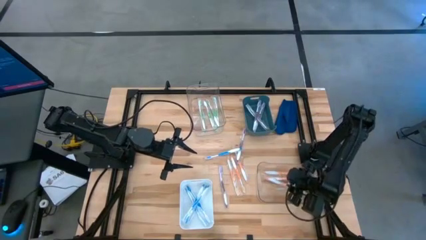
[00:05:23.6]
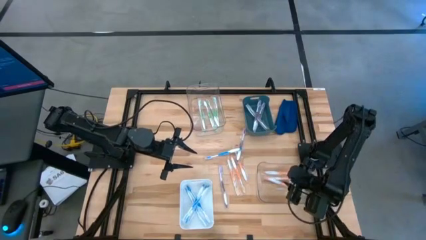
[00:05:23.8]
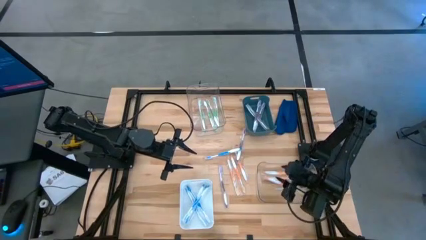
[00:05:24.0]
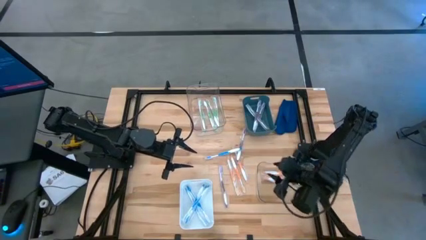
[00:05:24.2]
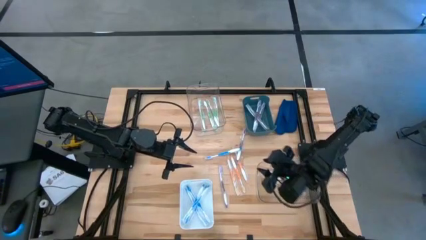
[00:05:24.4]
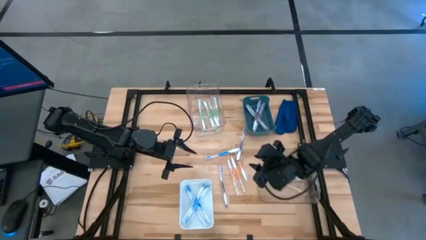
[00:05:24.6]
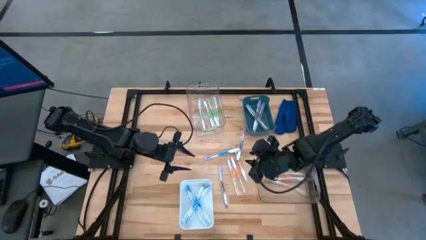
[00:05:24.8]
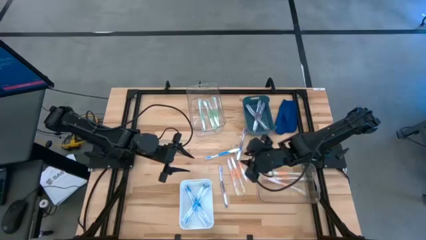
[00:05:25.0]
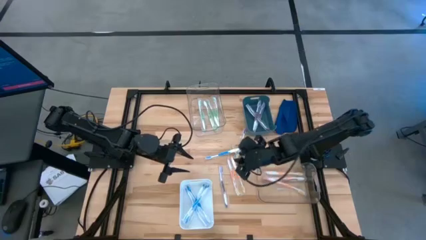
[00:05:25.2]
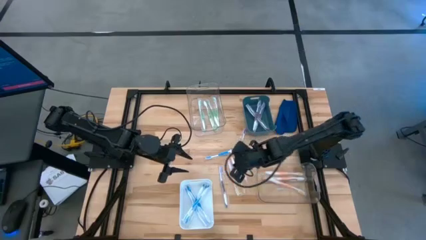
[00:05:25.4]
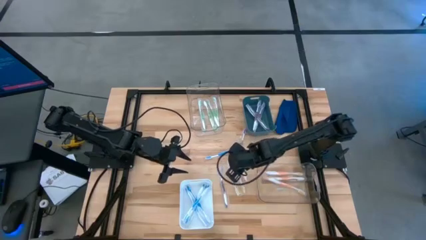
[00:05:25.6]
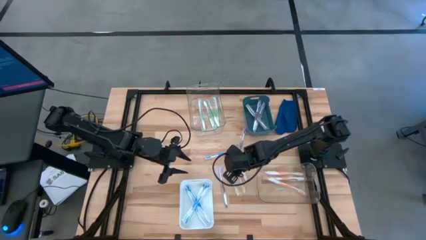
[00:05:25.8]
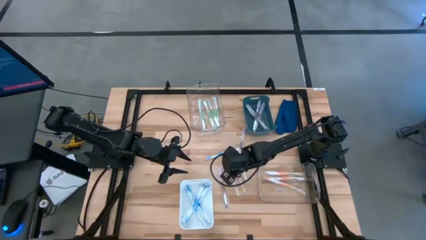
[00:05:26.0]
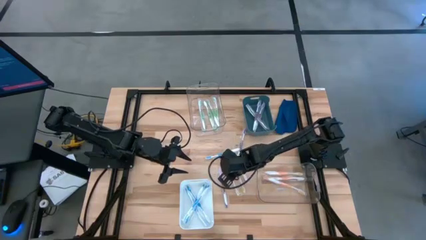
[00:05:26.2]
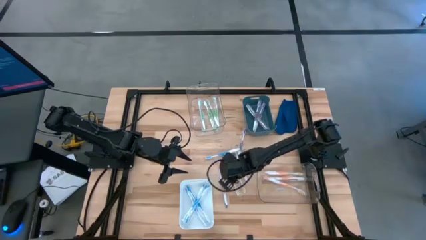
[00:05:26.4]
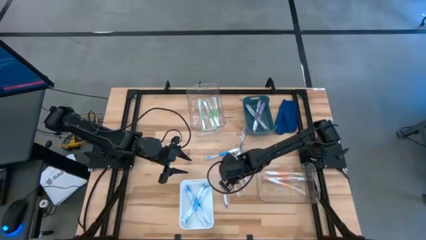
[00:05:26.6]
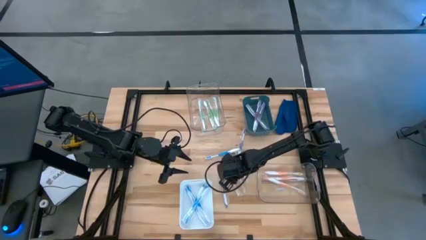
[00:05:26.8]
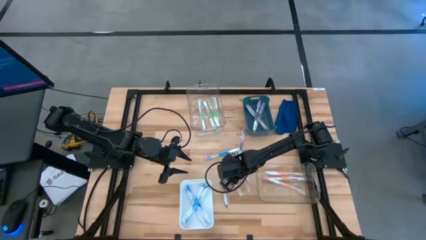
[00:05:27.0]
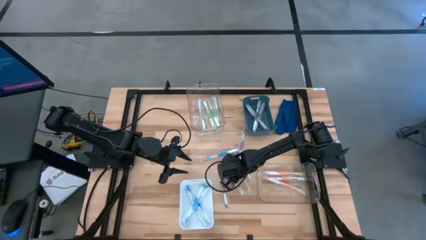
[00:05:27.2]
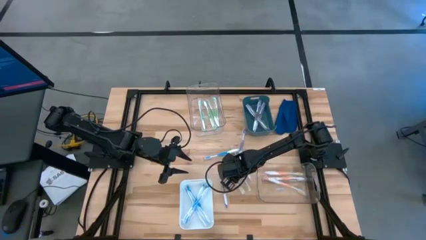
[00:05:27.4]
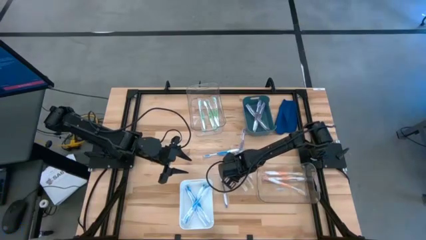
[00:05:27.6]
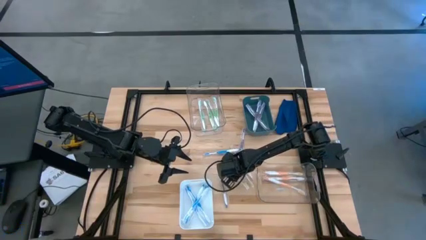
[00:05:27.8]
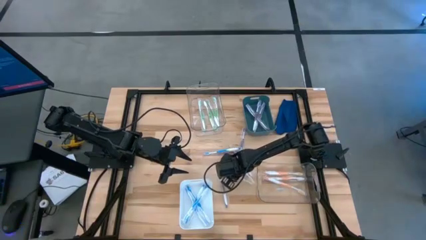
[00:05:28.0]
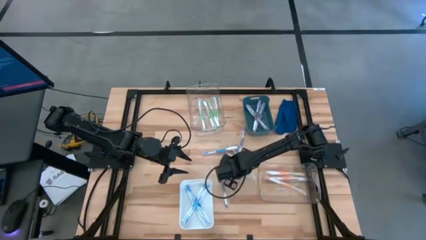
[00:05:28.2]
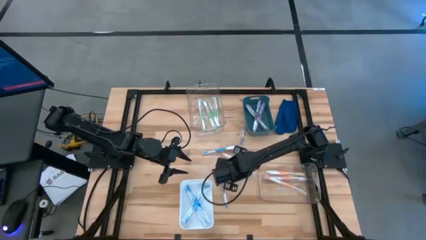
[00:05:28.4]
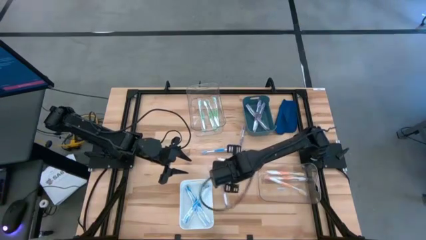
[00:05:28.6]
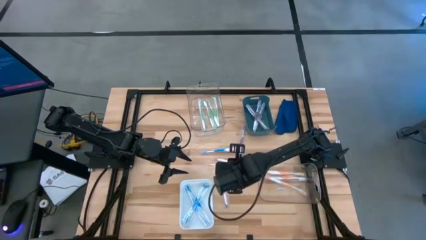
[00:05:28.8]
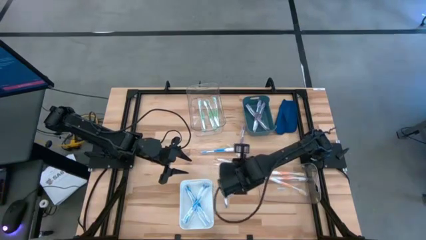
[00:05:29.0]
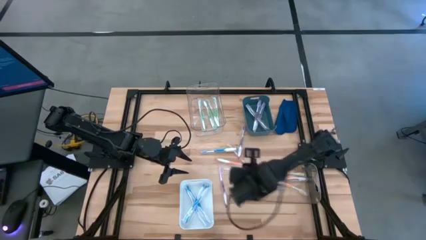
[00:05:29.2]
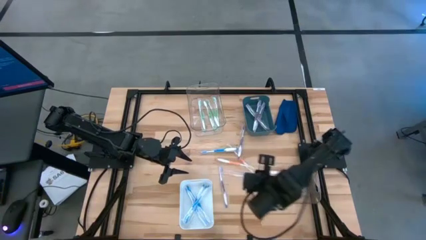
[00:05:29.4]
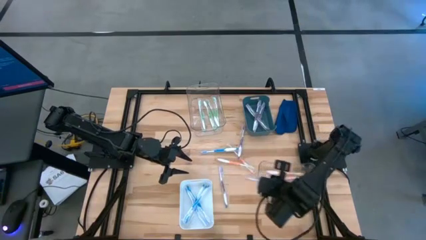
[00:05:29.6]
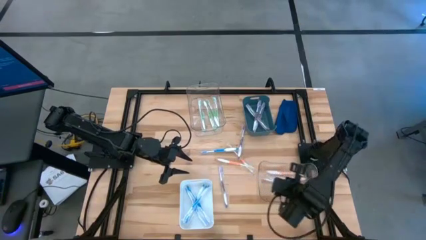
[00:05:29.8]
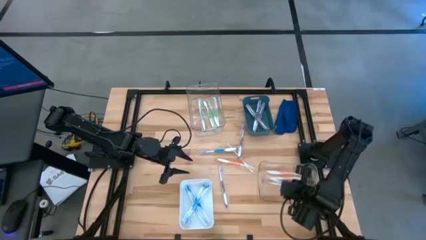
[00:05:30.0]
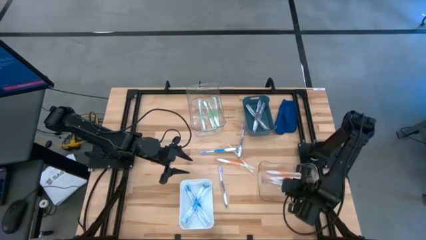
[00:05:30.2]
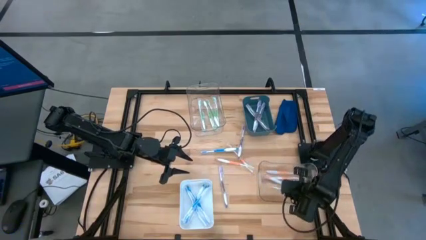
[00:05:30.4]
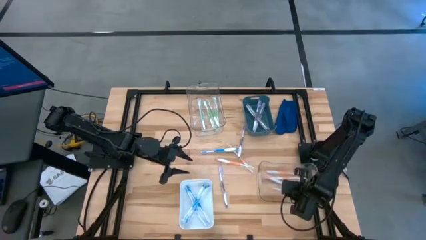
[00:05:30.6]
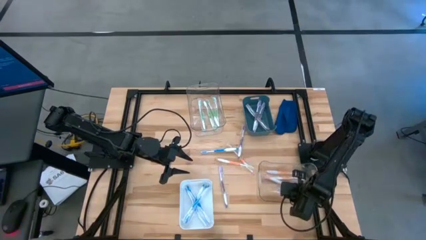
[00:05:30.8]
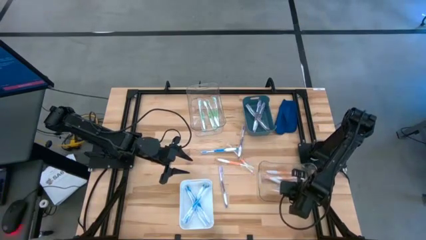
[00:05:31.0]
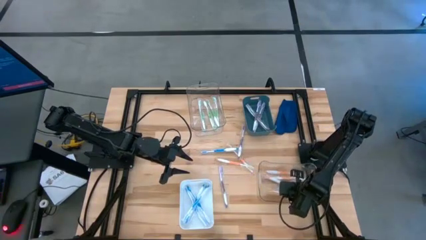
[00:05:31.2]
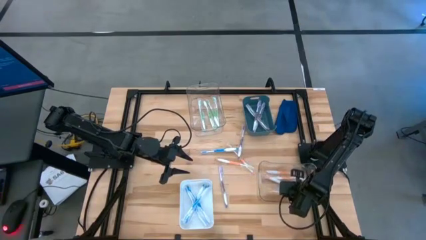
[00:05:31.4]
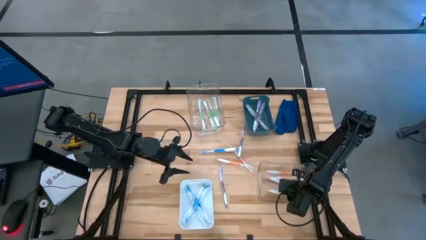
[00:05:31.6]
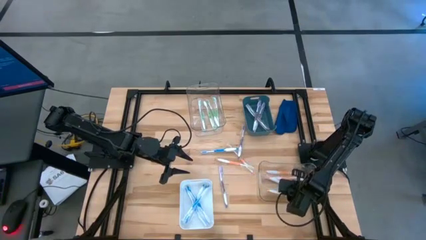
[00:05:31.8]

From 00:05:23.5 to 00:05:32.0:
Task: Pick & Place Toothbrushes
Put the orange toothbrush into the bottom transparent bin

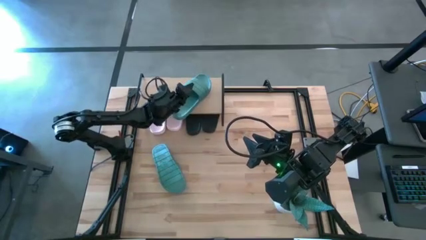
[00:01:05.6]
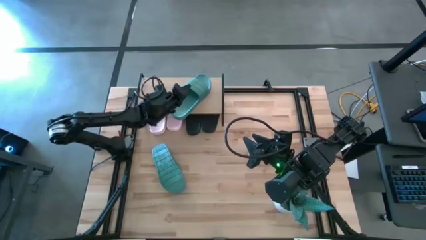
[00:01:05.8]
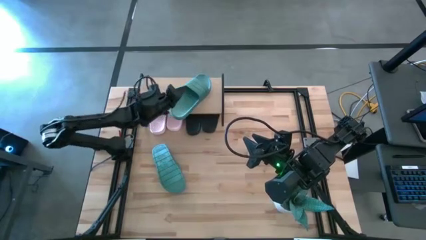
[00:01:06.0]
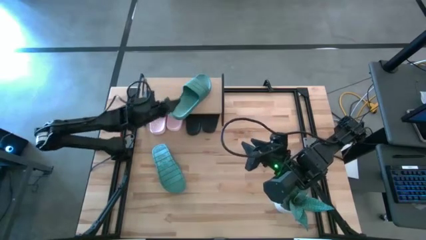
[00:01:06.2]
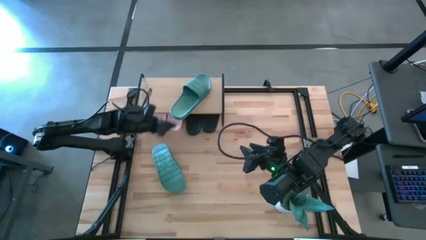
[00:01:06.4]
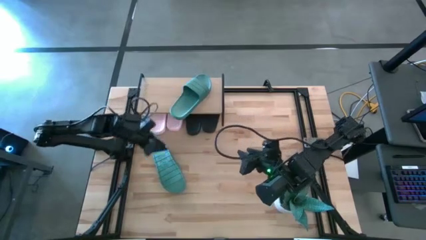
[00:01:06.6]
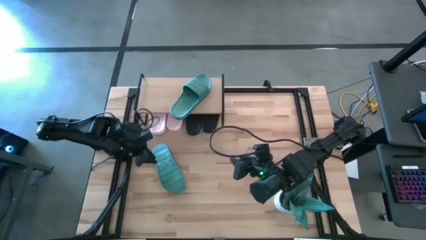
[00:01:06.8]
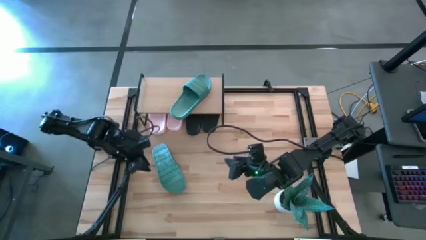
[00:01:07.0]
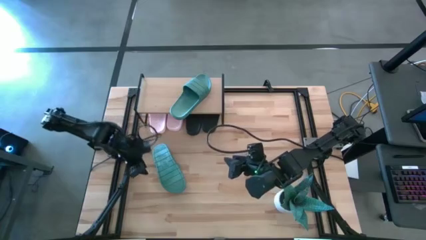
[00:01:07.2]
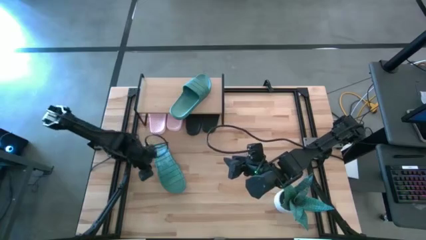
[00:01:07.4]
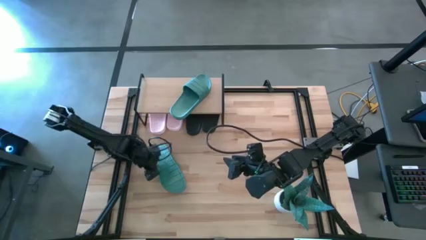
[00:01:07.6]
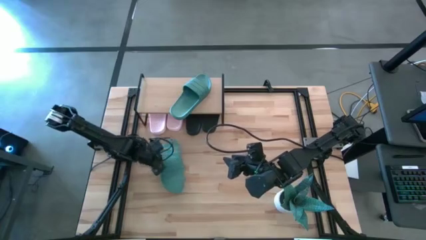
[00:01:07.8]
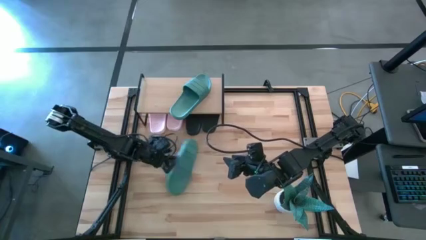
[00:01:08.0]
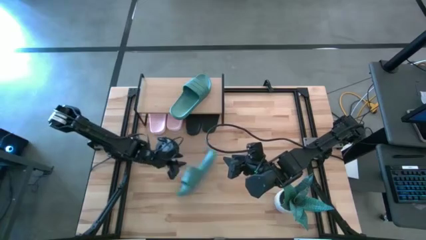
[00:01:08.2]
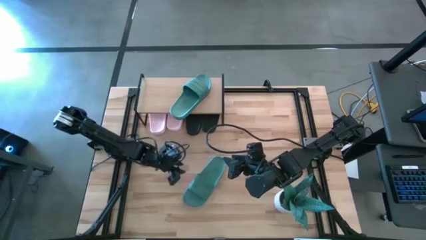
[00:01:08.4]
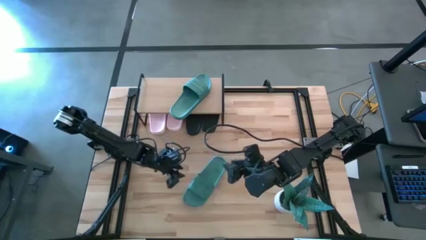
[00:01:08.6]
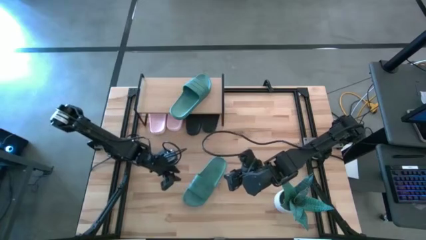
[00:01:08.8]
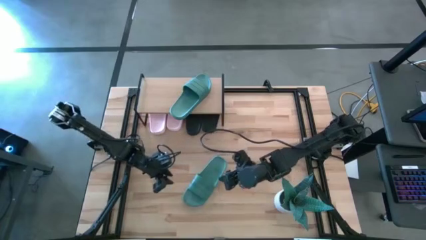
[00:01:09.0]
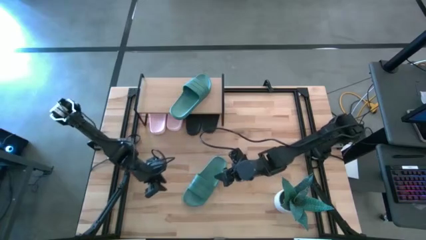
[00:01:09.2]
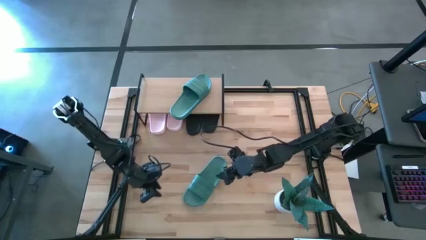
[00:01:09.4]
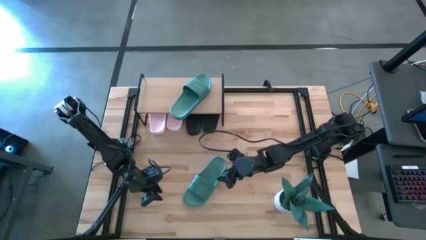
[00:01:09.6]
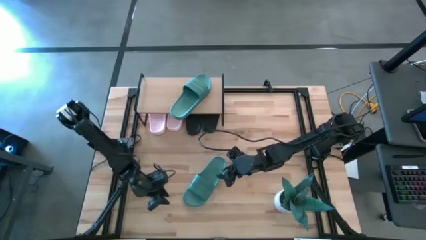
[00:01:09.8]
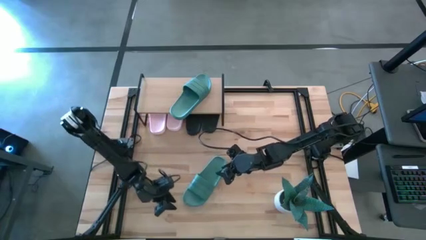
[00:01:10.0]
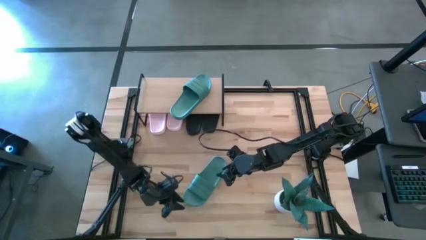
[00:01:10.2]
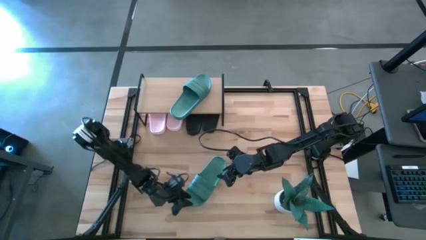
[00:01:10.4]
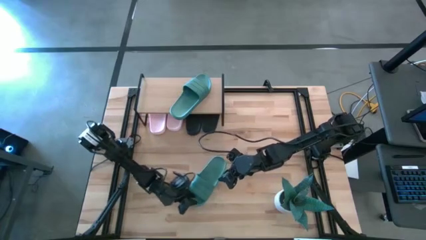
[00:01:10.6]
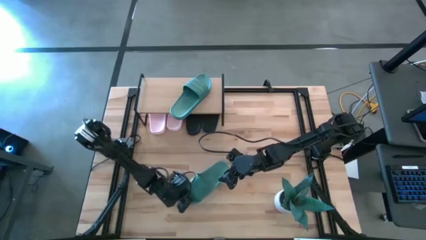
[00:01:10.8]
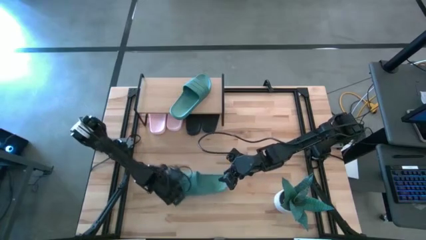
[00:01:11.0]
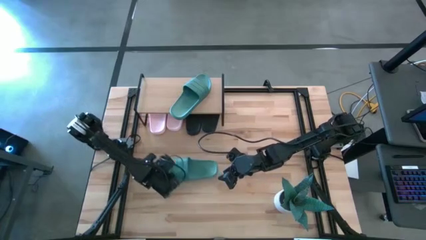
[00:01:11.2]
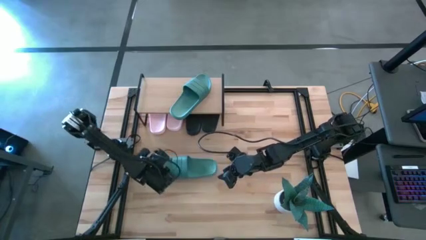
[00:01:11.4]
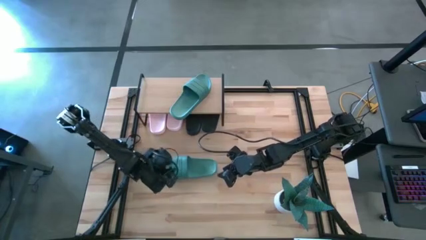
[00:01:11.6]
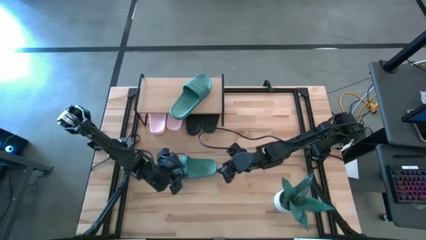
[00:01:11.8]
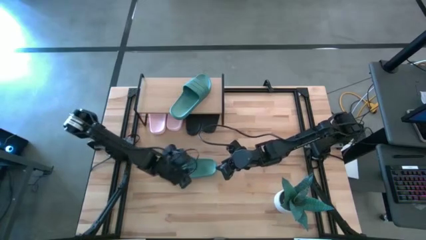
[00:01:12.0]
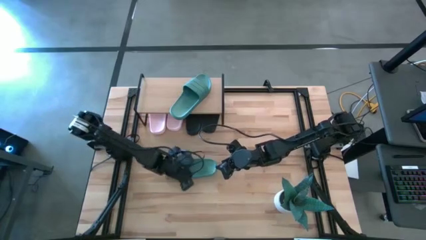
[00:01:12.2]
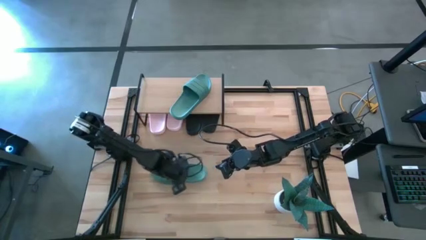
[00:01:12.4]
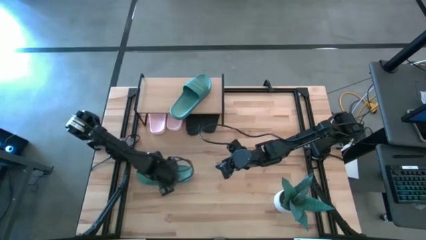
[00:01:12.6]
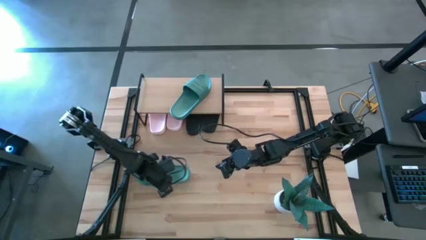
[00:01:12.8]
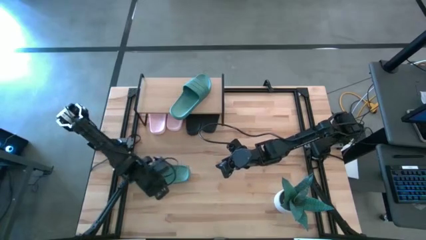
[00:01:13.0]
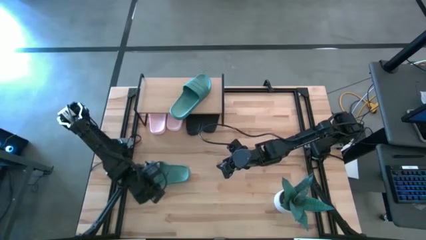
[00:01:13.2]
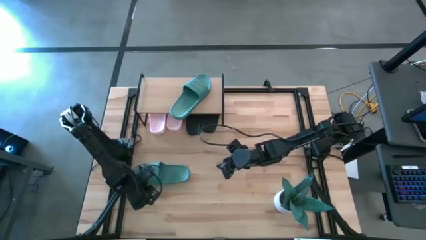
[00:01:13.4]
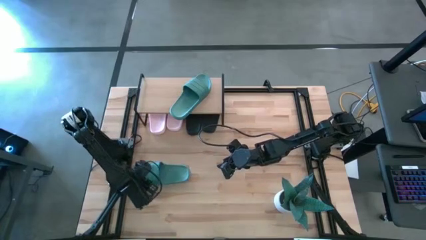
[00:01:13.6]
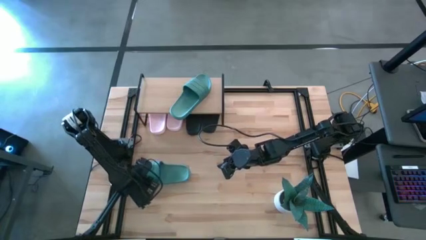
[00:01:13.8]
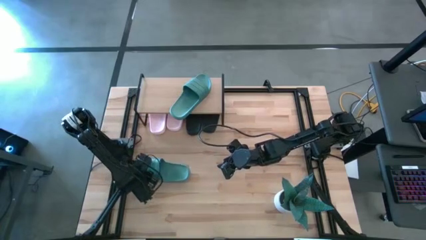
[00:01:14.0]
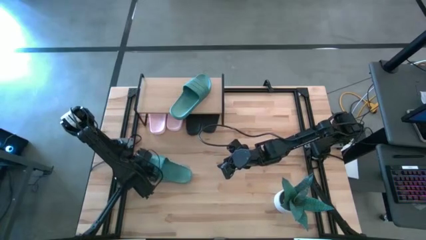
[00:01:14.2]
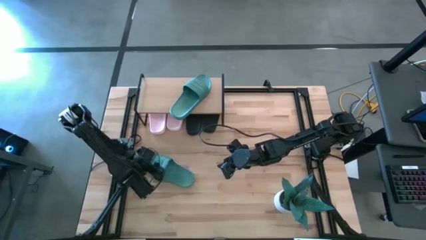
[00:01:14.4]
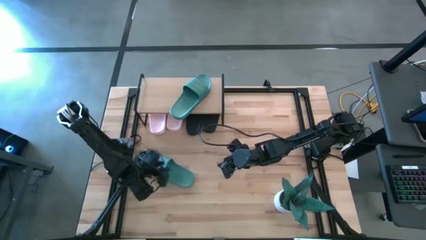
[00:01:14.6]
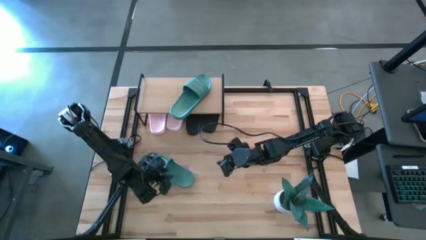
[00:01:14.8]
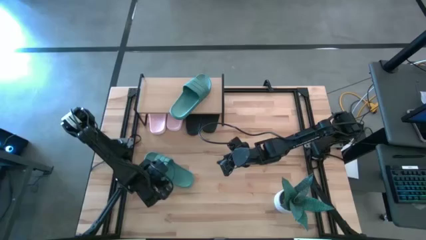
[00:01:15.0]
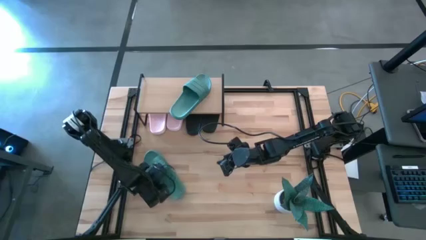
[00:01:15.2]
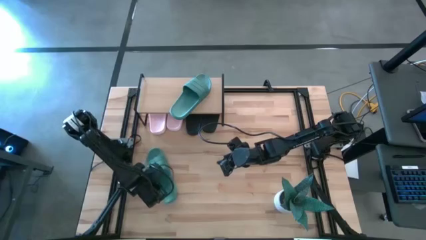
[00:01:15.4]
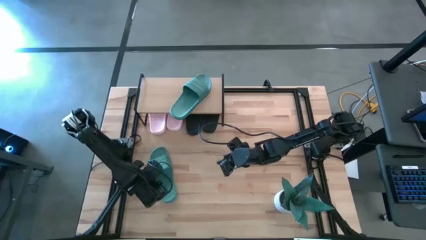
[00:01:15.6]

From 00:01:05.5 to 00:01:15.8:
Task: Pick and place slides into the shelf
Put the green slide on the shelf
